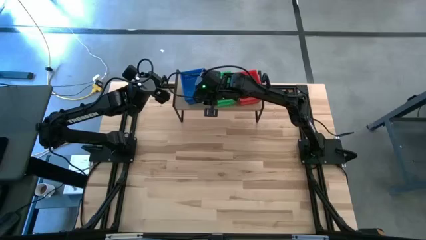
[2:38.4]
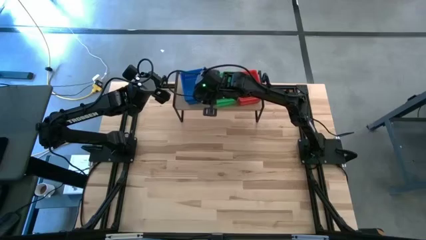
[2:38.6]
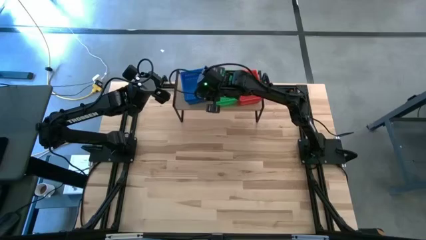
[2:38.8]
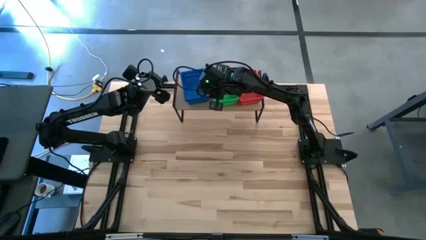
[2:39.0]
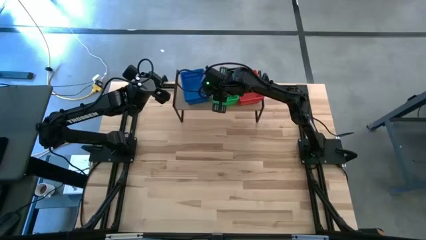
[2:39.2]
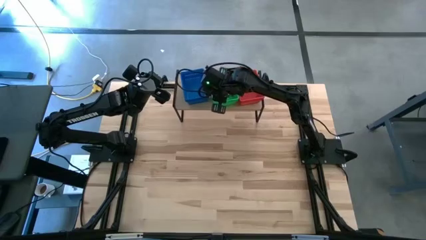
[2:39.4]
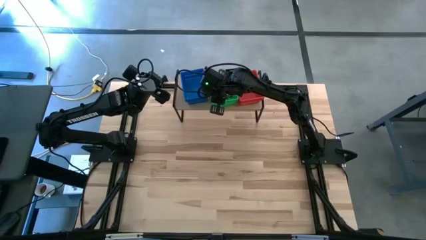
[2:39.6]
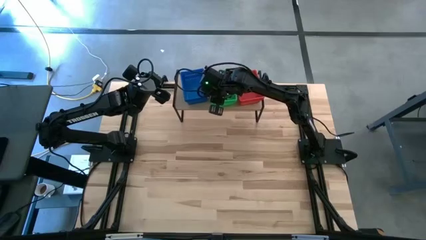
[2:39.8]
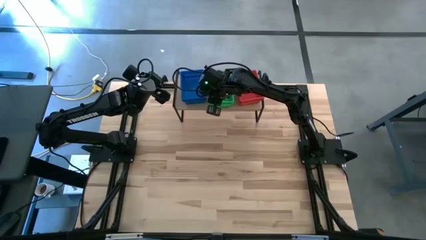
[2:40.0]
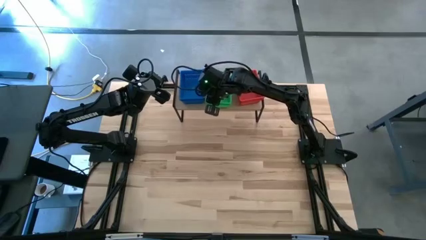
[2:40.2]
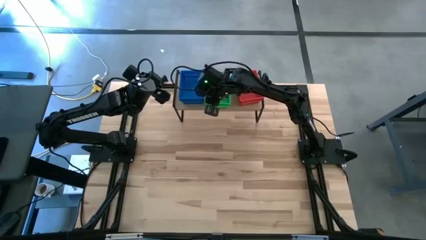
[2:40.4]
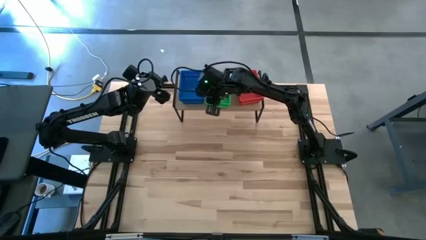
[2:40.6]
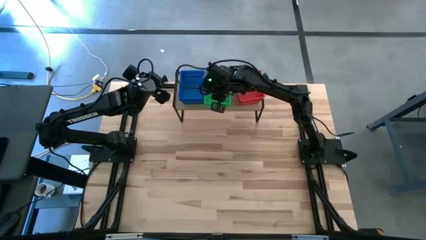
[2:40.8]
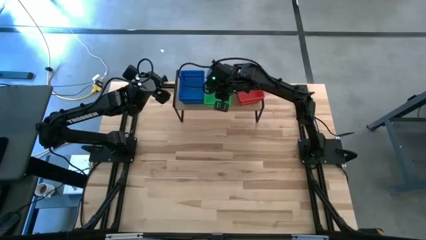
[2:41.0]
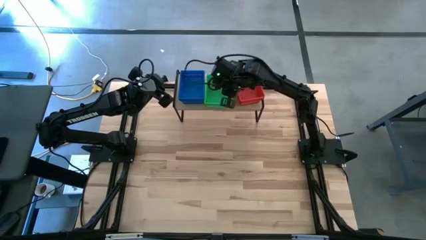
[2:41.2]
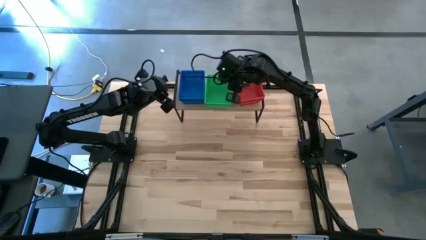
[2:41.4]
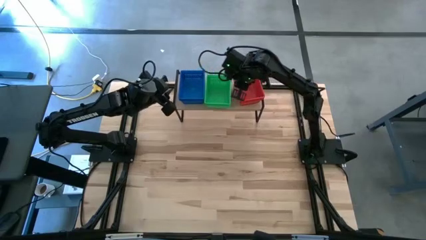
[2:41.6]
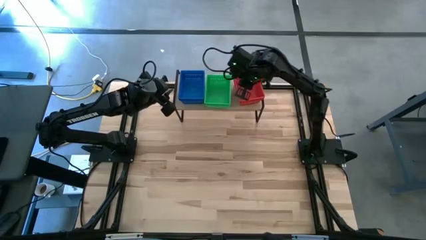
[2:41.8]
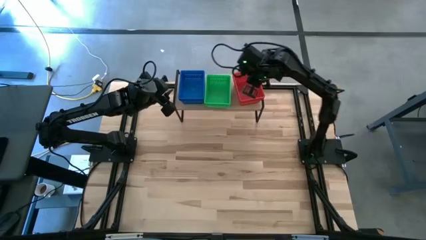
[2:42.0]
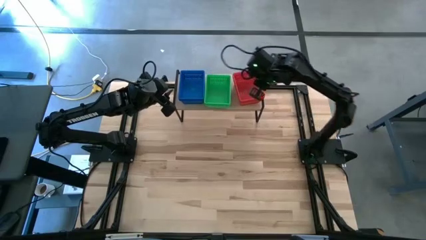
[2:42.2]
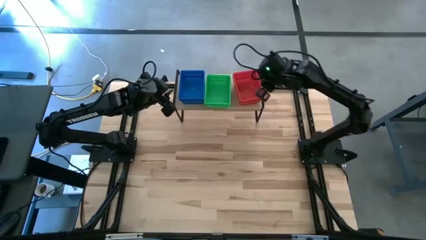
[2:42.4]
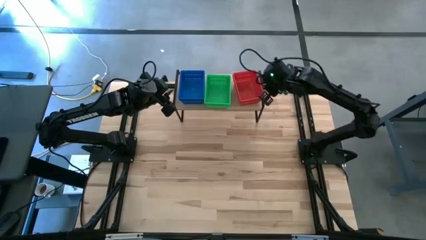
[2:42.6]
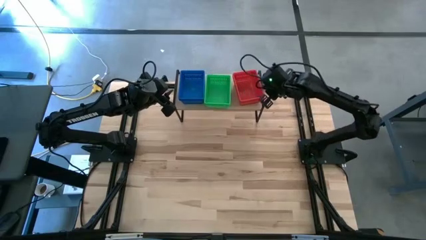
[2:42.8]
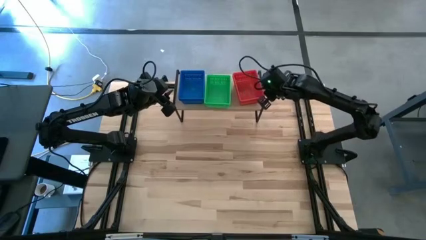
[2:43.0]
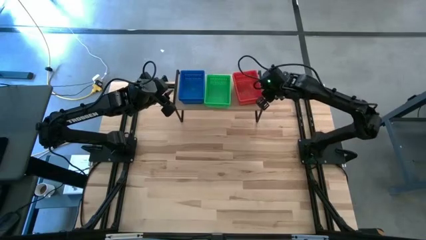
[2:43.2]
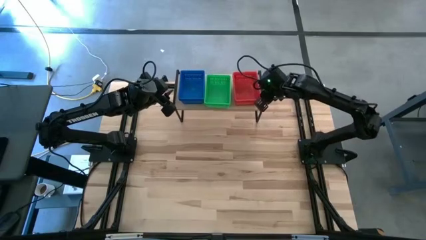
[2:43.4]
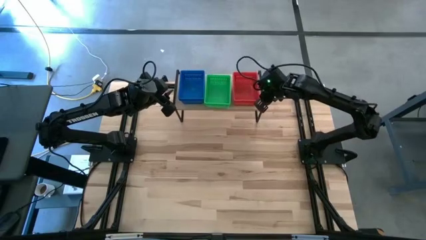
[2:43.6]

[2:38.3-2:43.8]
Task: Stack baskets on shelf by color
Adjust the bins

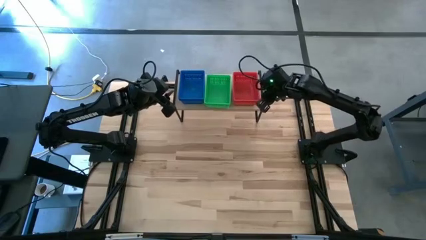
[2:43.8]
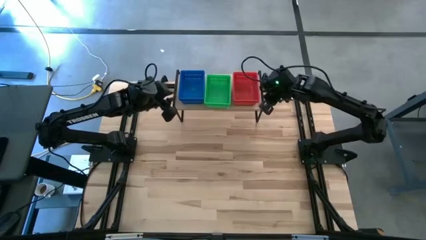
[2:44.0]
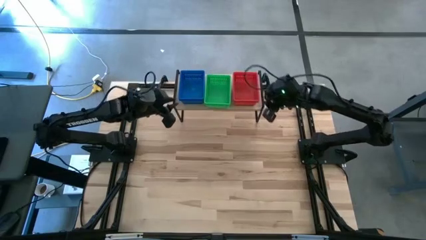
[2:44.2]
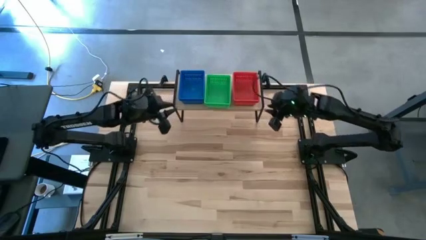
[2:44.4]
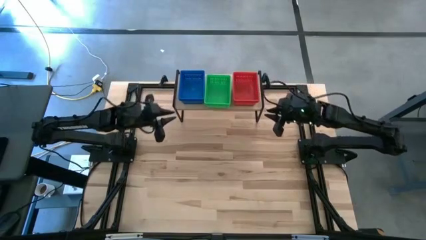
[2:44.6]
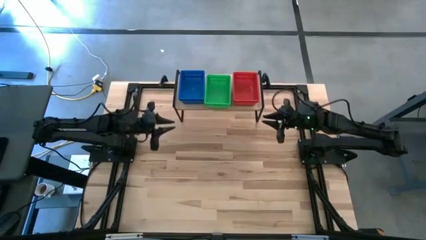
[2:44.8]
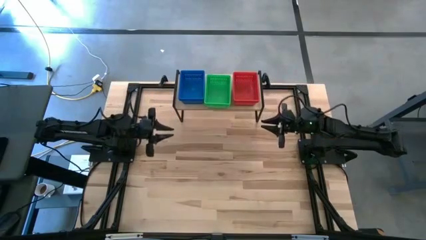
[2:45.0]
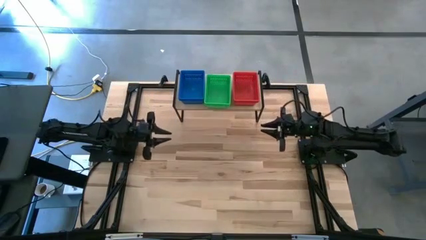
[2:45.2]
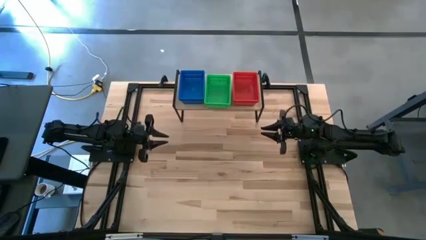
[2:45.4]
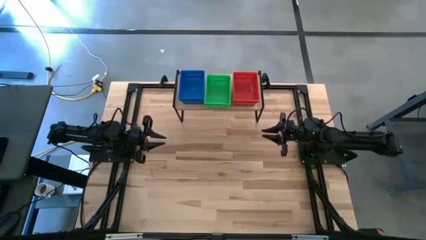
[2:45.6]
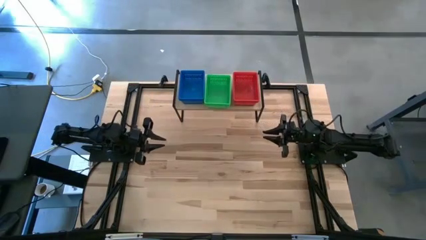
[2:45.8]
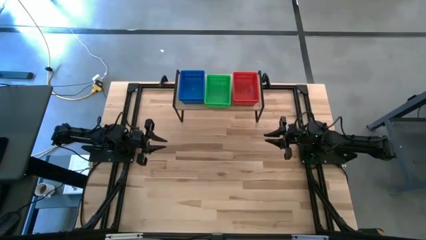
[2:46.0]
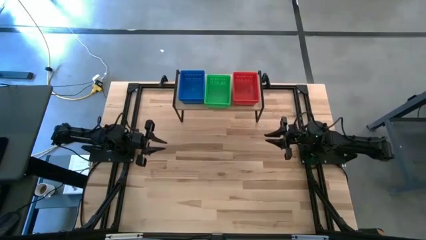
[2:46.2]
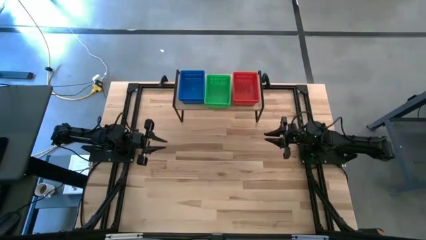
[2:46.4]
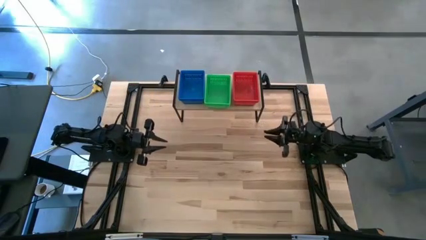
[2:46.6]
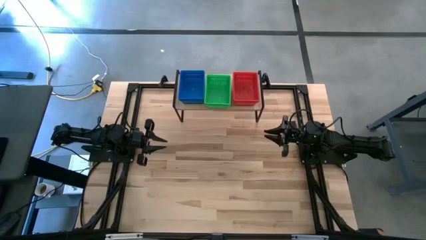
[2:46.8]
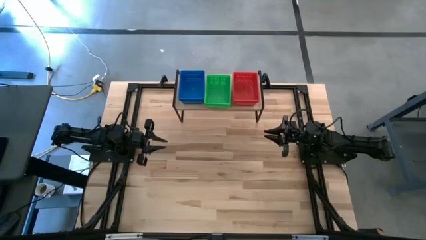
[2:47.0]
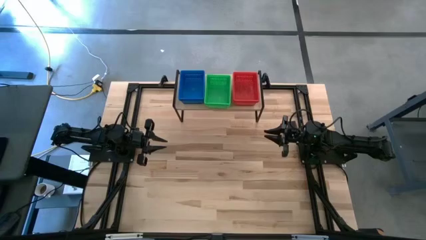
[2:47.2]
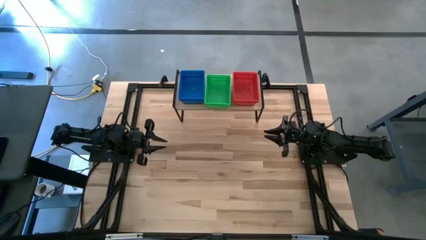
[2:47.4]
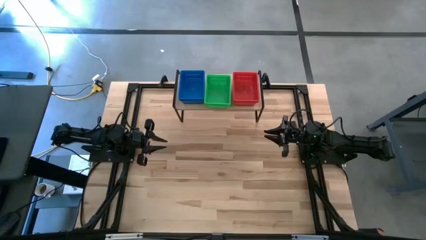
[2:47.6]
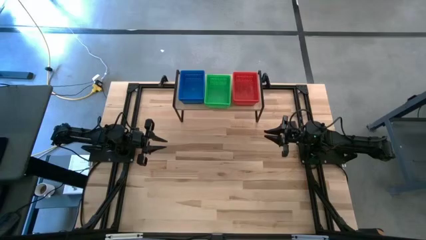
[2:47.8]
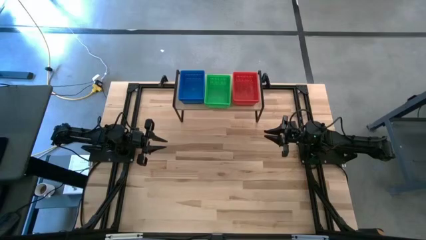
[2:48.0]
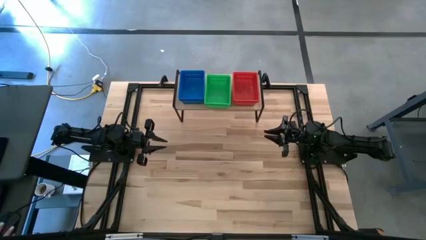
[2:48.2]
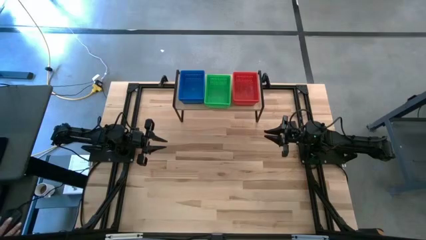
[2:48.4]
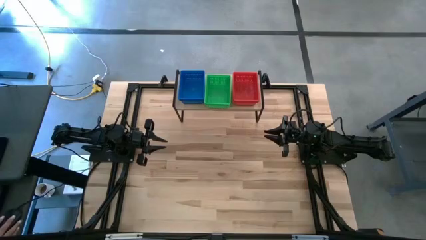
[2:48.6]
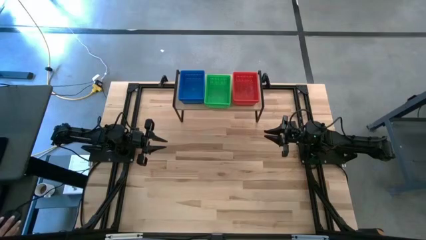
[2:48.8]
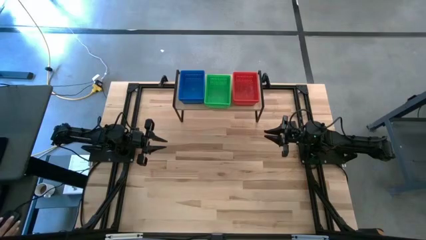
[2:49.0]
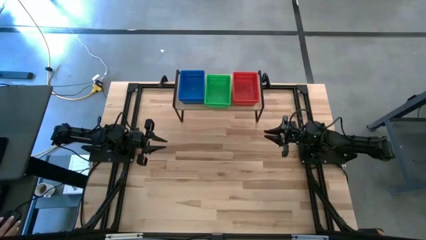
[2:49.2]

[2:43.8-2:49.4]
Return to home position

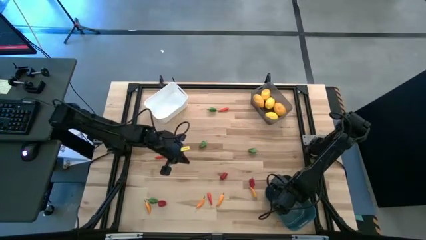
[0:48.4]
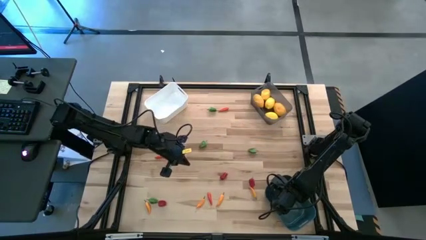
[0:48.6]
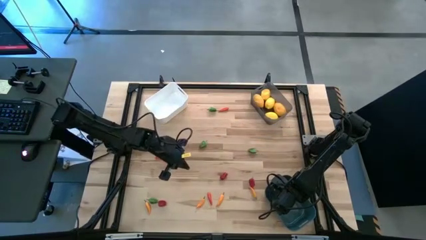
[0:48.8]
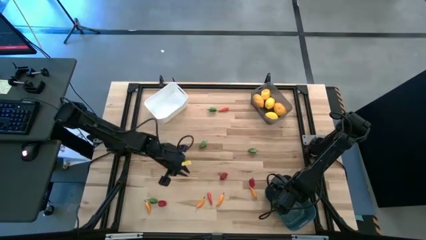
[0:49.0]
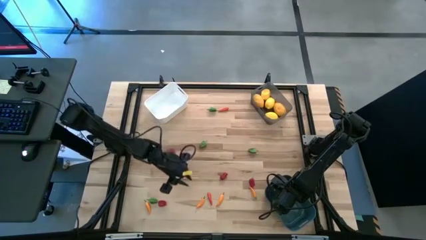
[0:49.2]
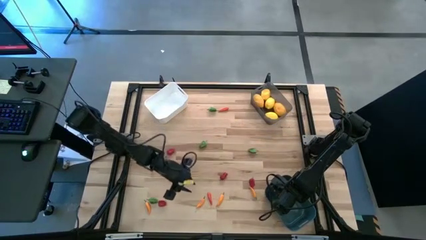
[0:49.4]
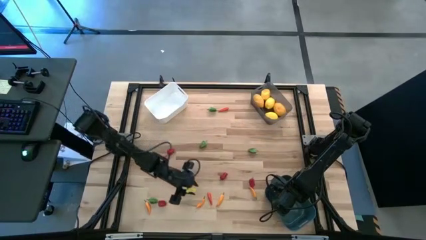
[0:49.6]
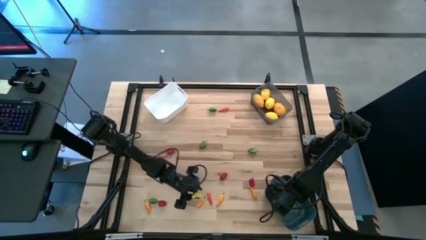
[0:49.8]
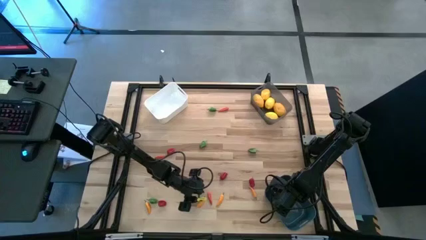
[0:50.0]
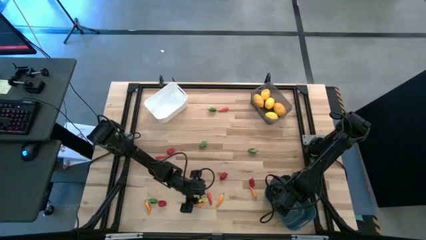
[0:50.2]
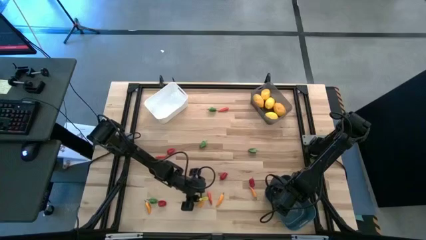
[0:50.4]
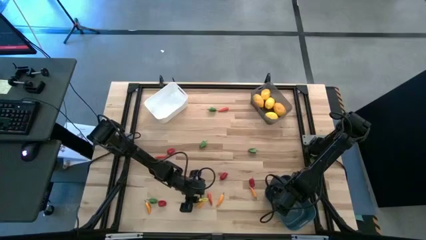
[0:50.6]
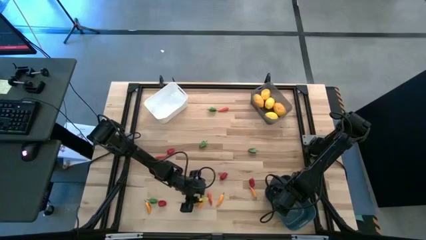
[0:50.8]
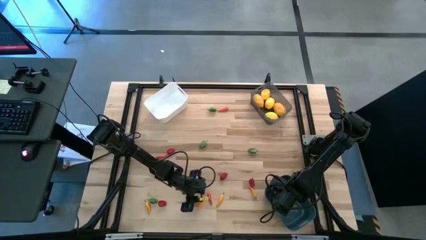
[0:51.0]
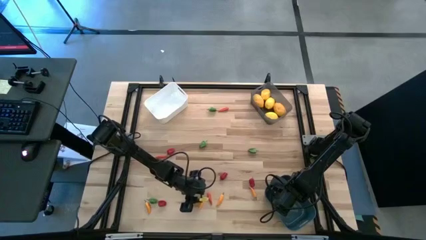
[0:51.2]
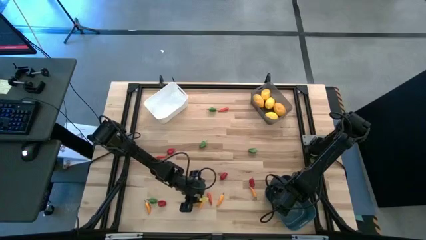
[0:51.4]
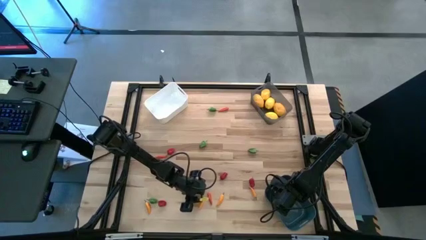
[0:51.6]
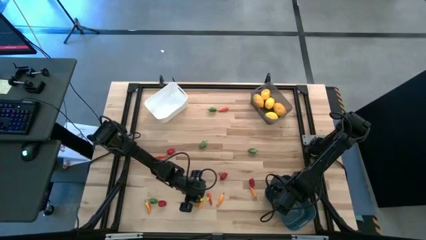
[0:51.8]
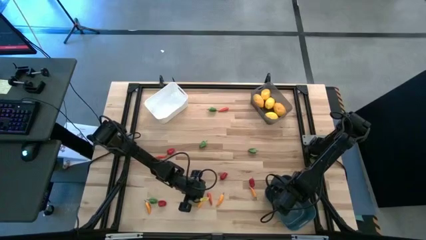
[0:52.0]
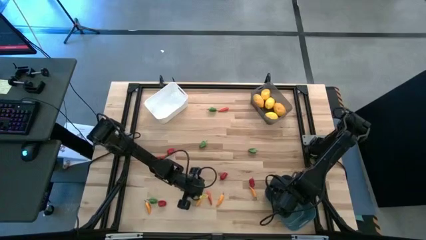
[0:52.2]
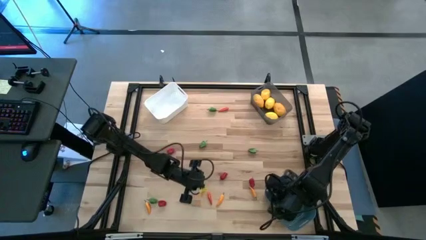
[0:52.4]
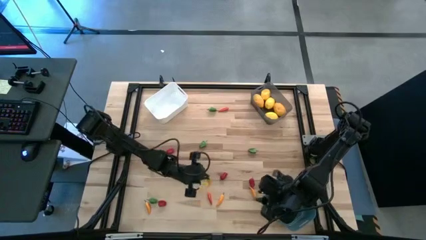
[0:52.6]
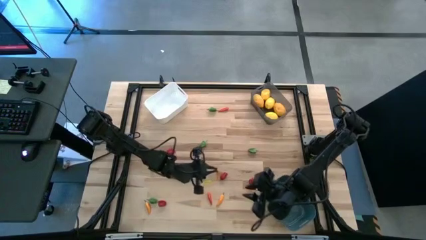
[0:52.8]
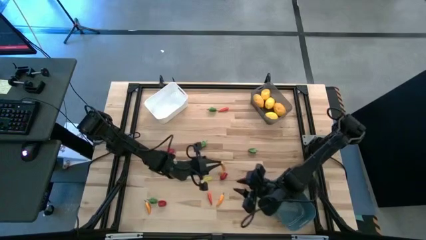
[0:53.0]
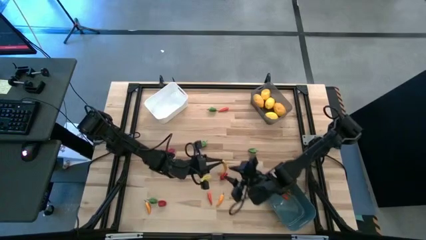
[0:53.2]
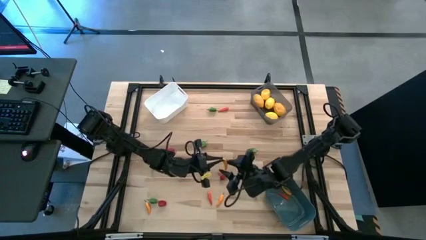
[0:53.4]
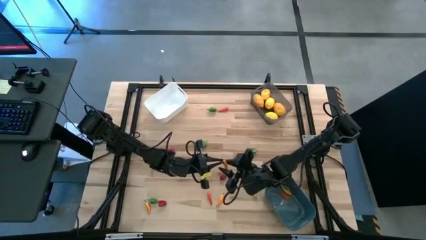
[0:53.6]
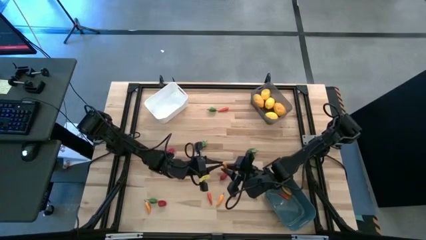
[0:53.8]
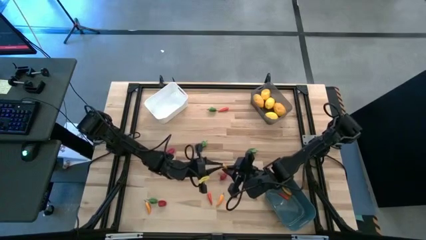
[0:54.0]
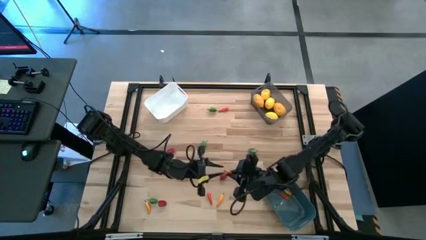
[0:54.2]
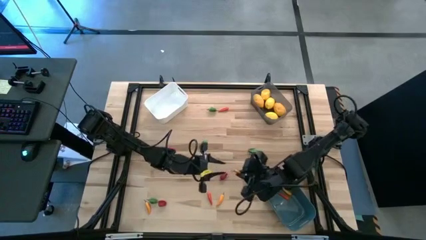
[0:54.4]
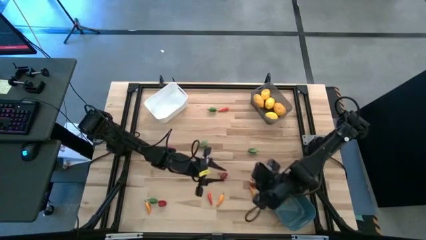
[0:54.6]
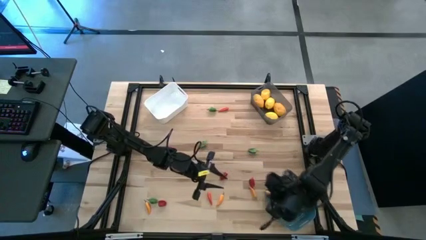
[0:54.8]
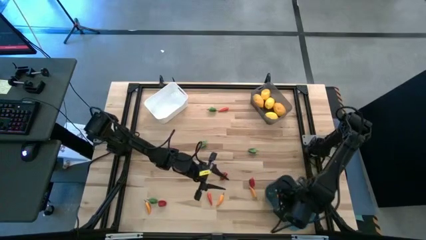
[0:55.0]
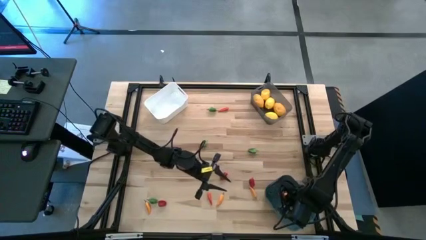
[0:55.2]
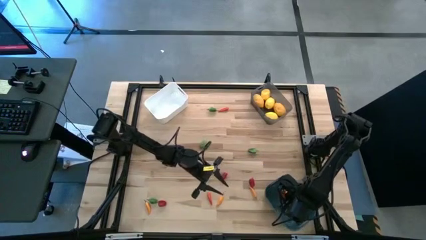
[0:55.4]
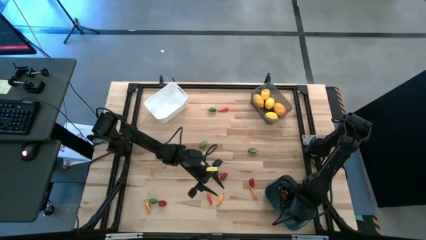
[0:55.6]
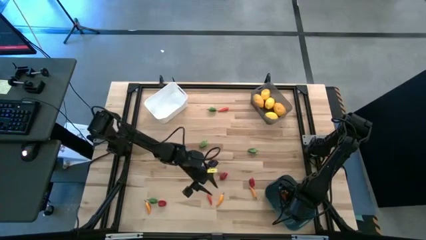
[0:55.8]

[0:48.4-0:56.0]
Task: Sort produce into baskets
Put the yellow chili pepper into the blue bin
